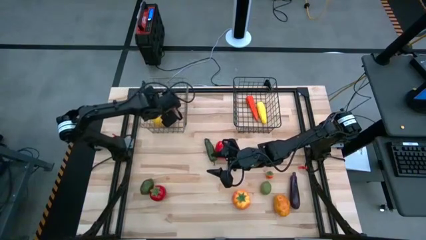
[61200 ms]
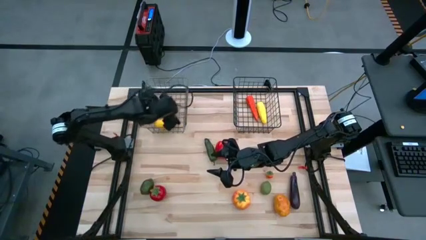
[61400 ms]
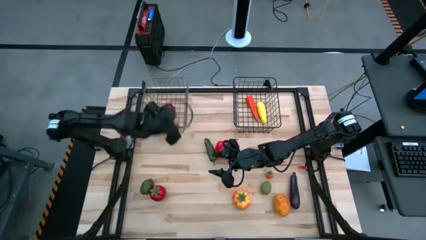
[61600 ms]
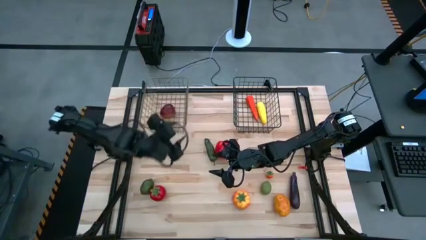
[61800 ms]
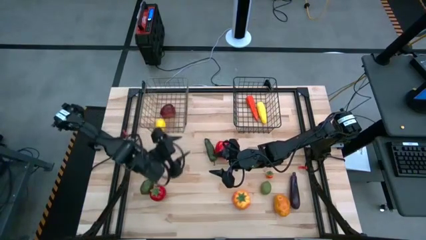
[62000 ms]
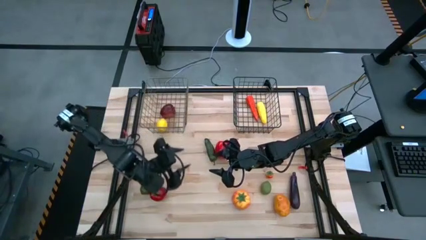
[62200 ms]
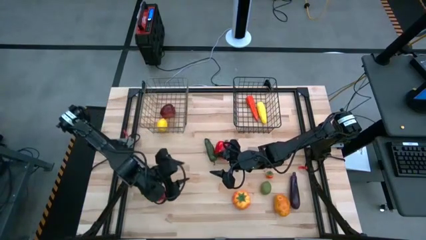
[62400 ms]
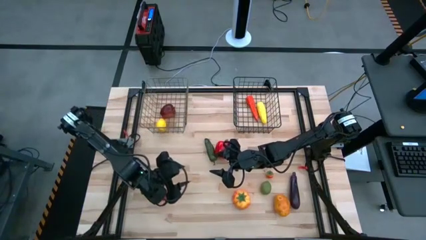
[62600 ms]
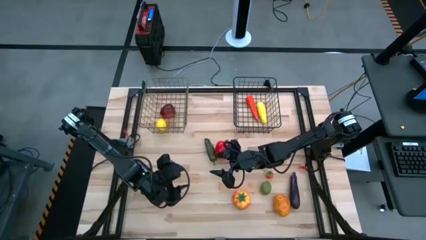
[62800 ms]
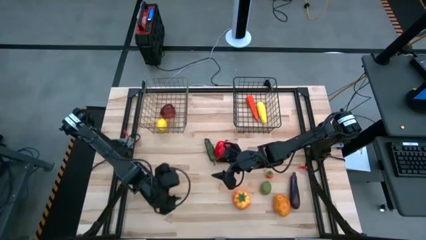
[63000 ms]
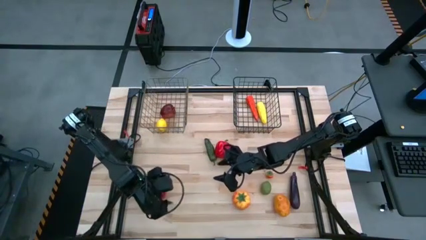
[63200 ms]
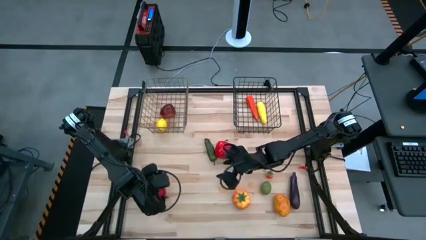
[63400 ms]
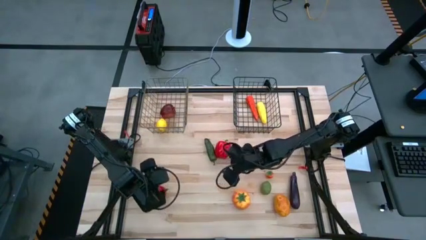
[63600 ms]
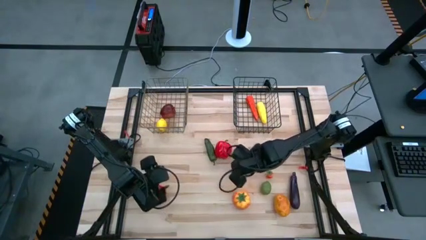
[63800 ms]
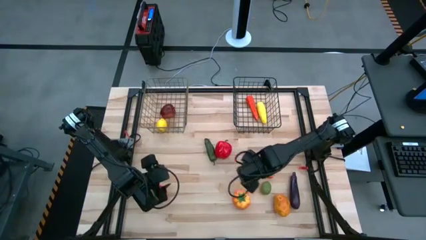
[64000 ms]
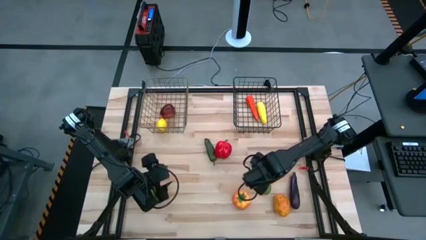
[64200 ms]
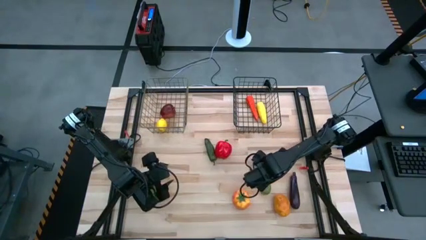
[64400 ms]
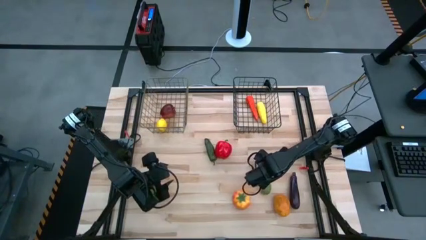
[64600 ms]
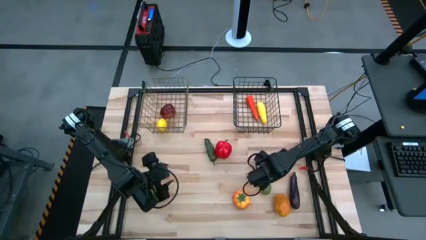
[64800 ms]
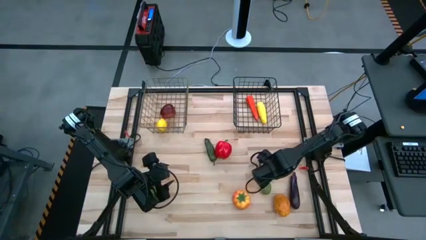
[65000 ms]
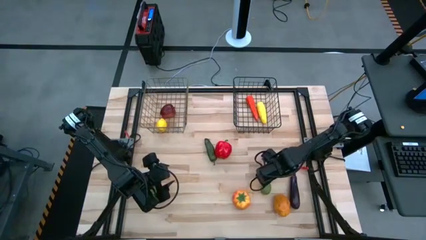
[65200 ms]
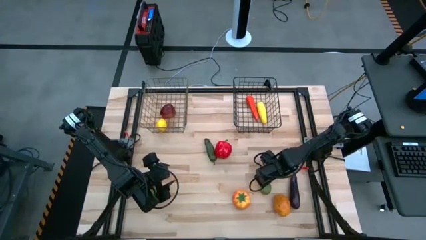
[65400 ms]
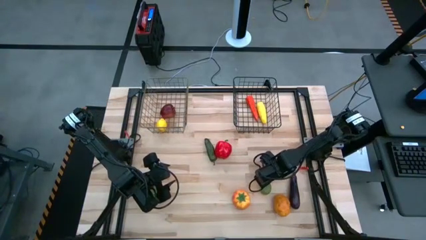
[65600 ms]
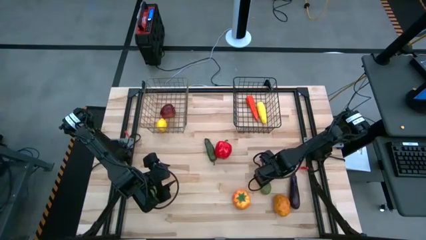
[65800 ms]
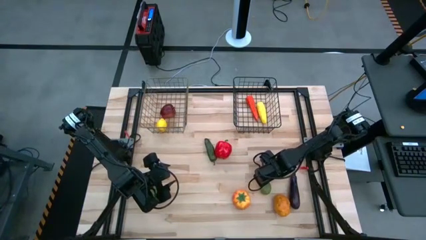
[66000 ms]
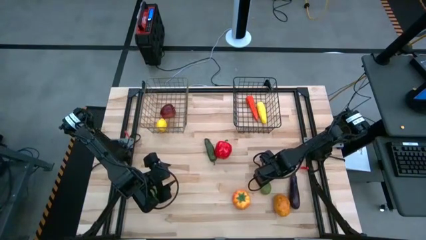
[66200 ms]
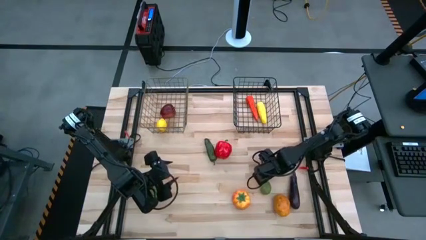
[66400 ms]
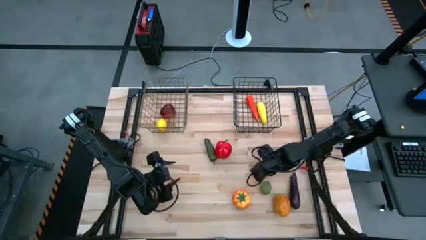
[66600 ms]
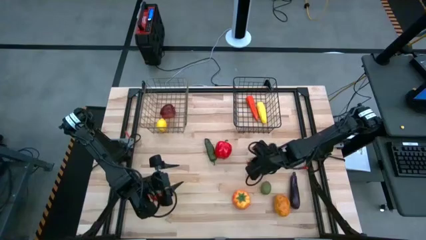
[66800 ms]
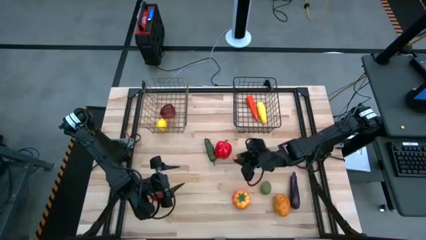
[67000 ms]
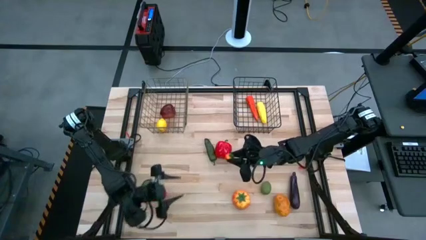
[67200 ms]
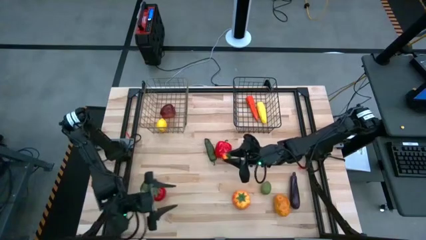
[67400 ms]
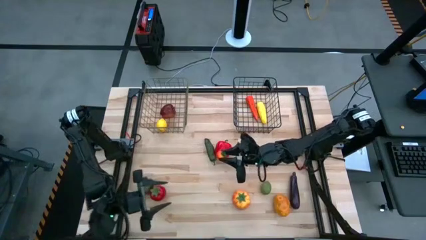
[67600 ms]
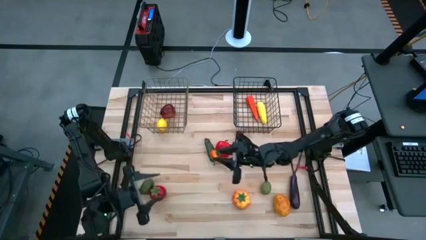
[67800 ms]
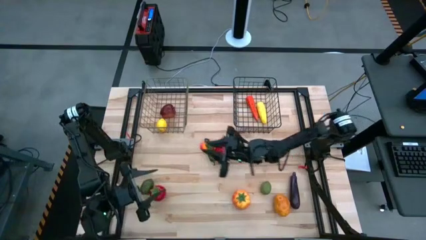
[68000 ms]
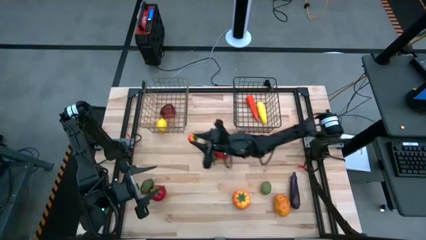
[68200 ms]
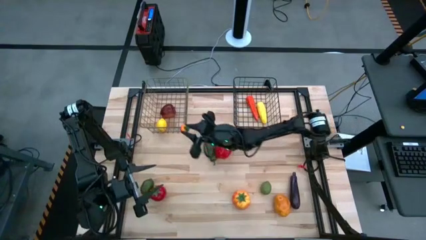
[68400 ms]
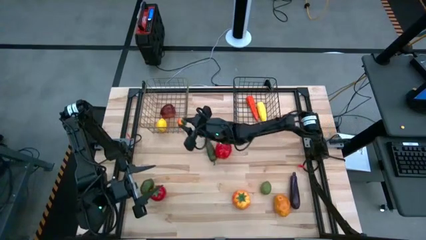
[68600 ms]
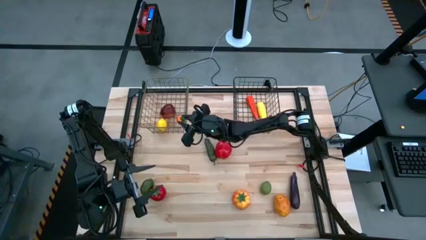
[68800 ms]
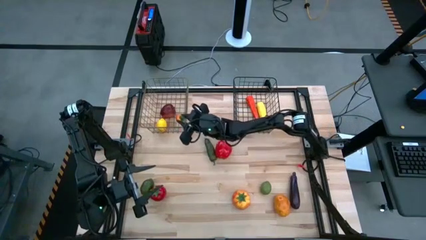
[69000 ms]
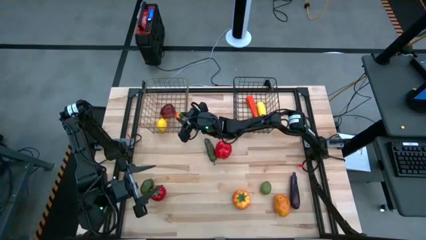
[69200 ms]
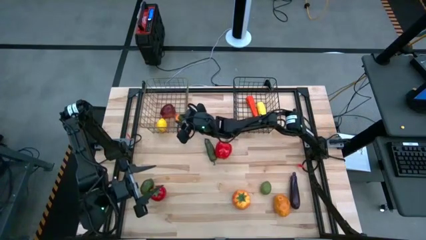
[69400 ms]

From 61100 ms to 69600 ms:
Task: Sort produce into baskets
Put the strawberry into the left yellow wire basket

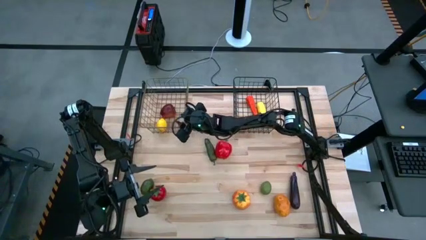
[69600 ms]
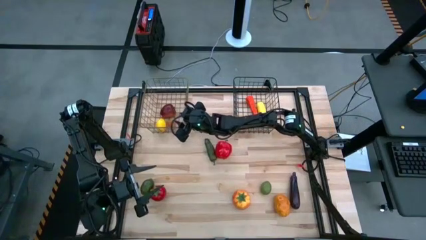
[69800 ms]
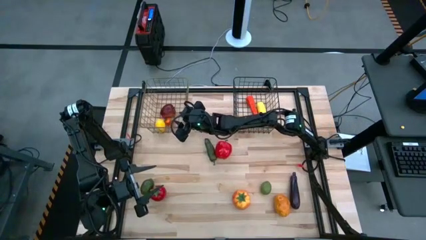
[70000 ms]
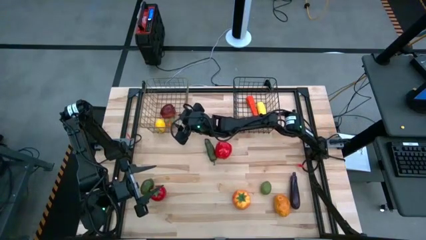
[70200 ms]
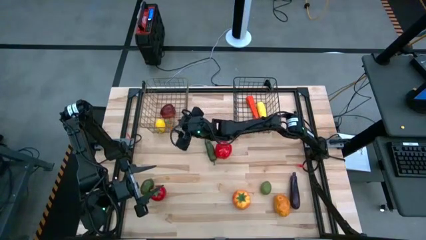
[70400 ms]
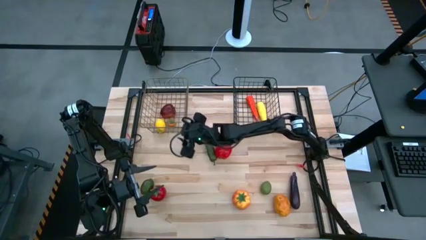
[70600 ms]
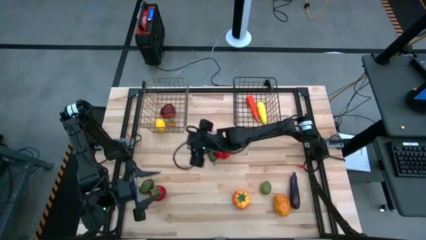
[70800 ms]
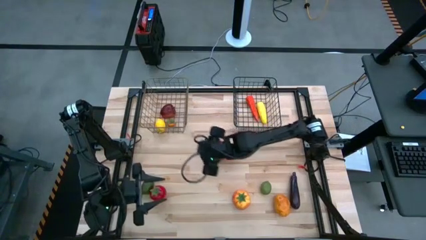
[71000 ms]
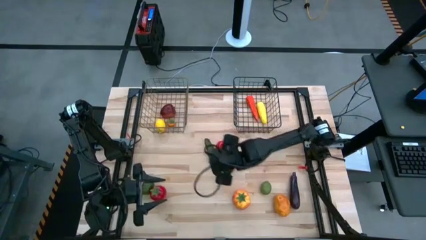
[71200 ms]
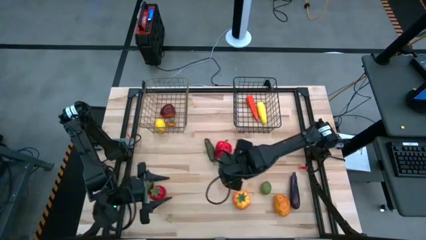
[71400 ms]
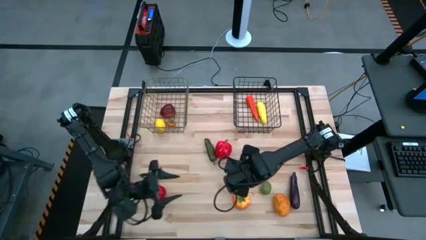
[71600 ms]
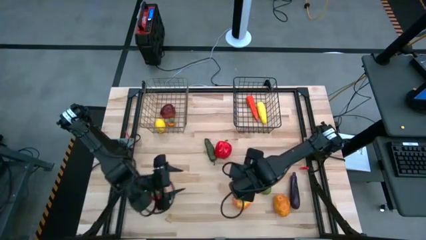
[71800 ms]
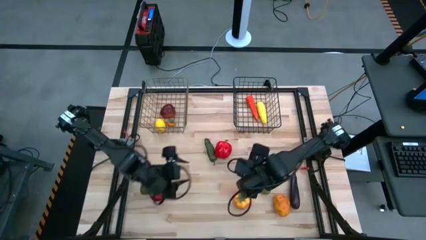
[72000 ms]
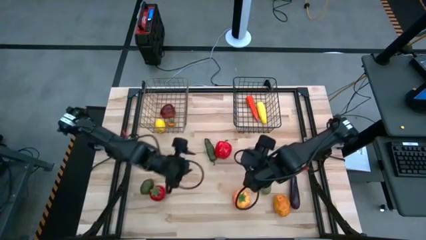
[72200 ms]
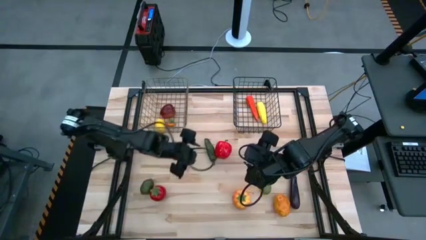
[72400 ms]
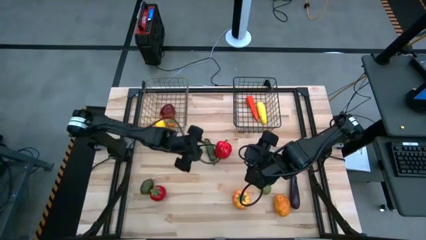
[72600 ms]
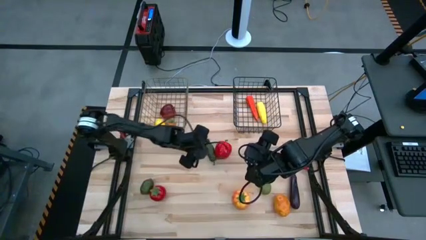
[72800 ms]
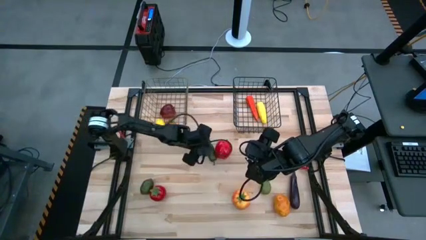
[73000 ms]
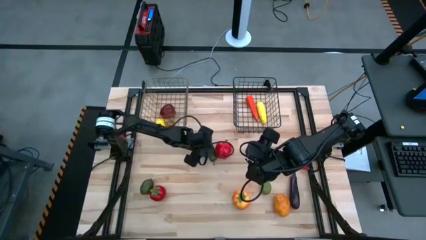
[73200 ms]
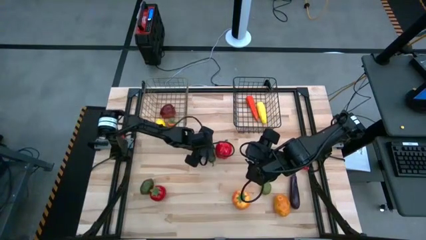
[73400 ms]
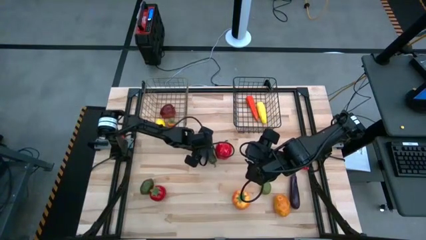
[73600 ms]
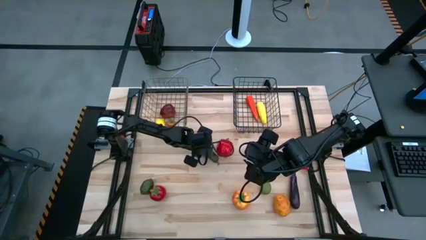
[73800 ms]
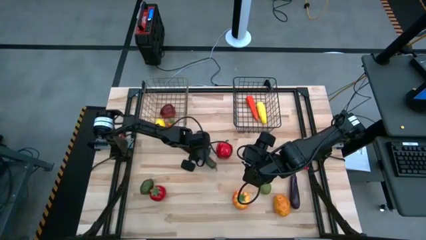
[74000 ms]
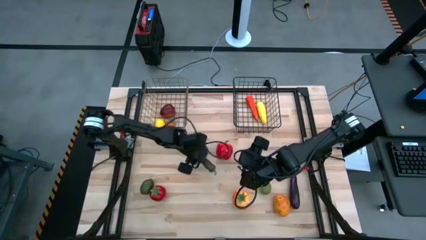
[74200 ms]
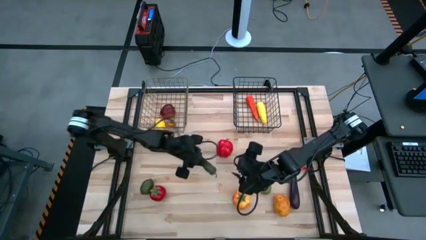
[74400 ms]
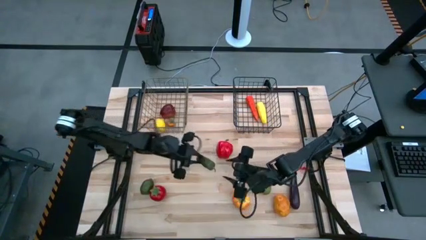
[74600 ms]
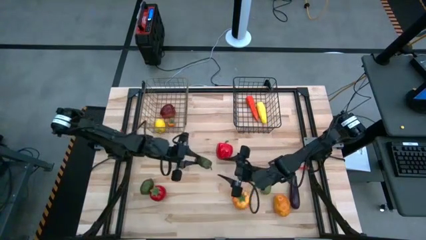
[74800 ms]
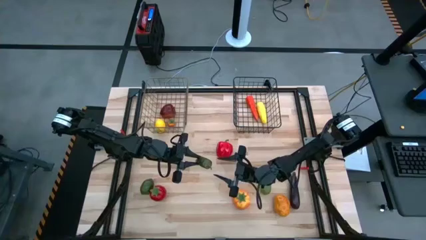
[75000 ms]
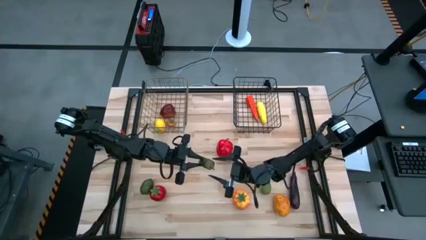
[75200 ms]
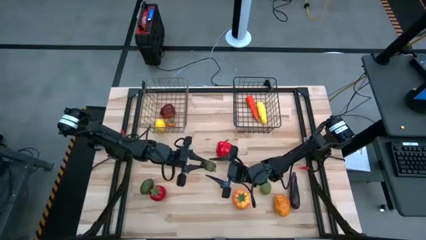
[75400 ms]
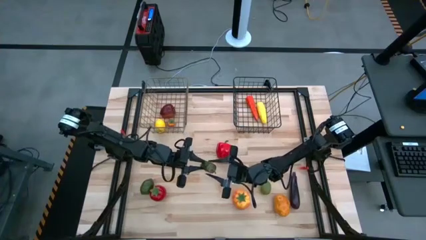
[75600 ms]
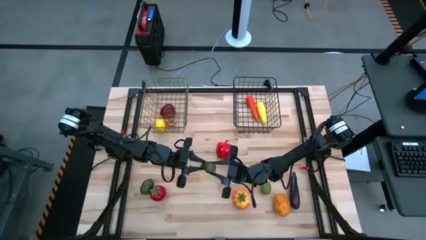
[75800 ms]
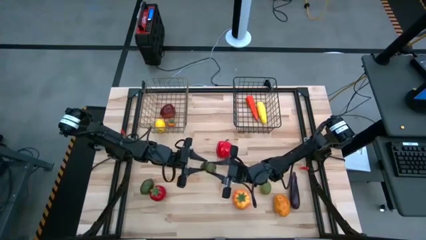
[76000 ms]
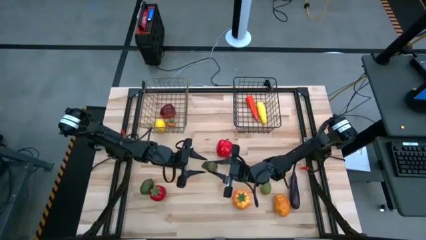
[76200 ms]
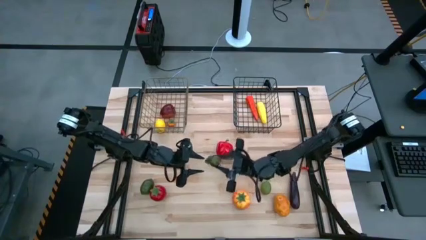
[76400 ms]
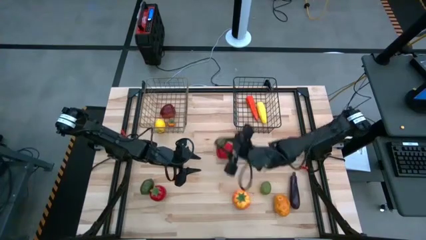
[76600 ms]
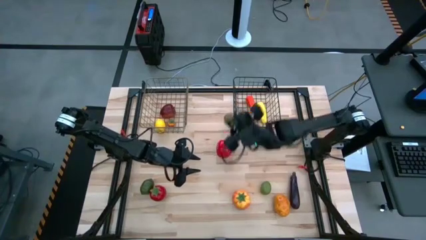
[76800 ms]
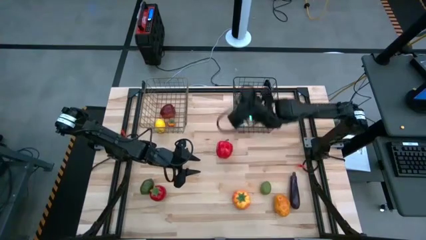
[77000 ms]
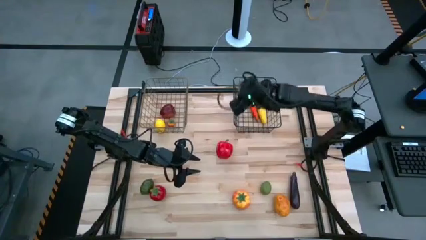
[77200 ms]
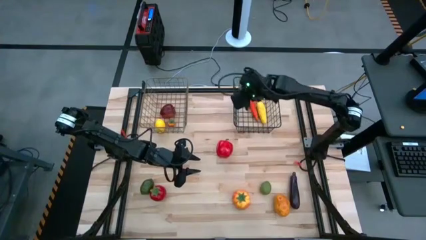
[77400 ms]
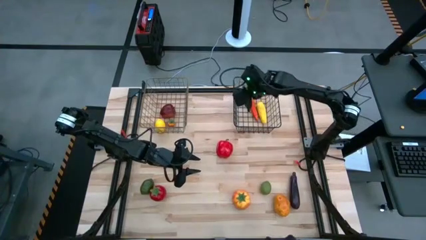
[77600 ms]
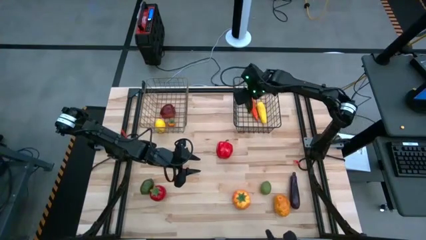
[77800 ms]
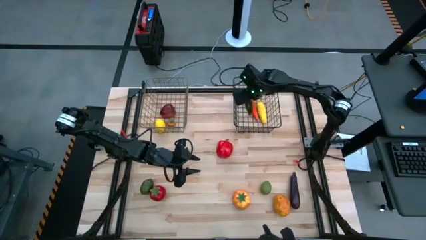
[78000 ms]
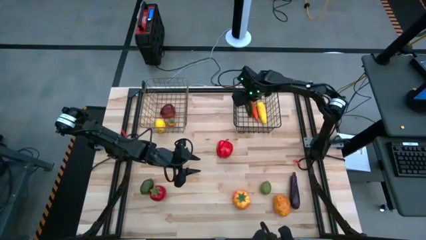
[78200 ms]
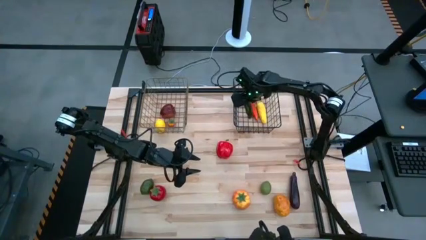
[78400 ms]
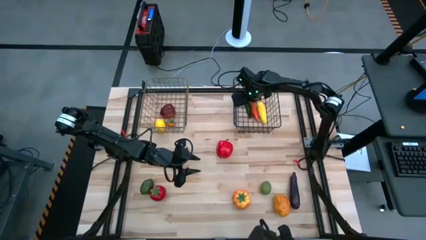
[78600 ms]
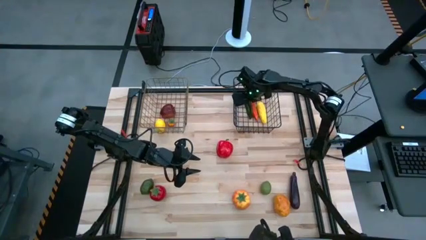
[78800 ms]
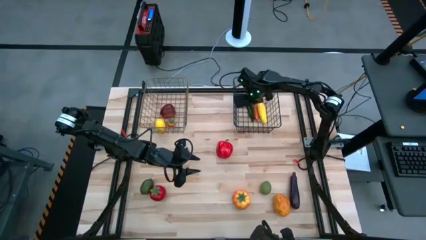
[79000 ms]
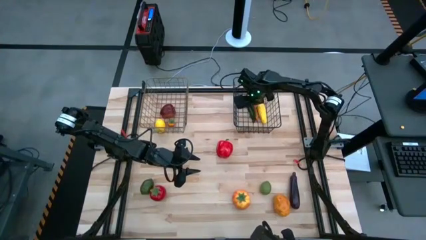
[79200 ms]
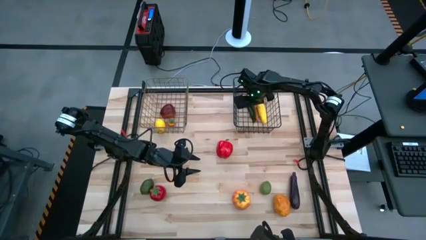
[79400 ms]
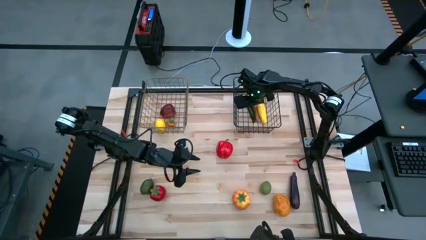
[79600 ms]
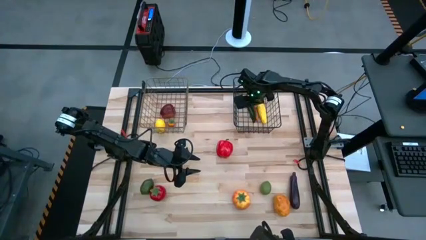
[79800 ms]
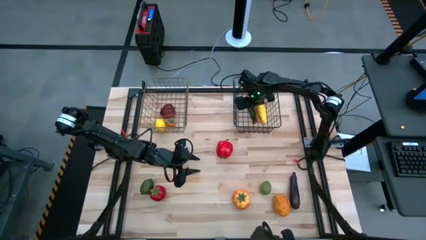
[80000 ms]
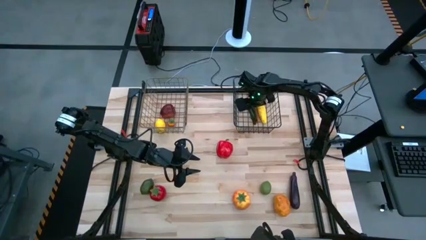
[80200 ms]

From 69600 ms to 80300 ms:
Put the green chili pepper into the right black wire basket
